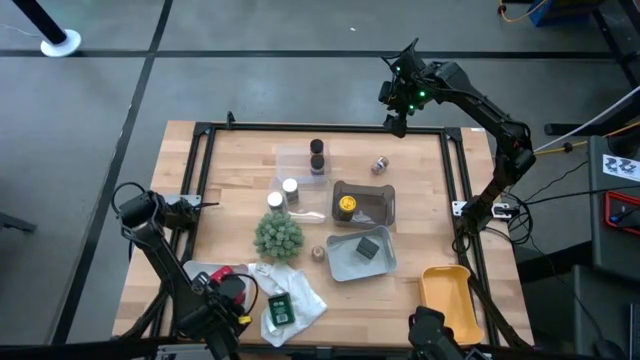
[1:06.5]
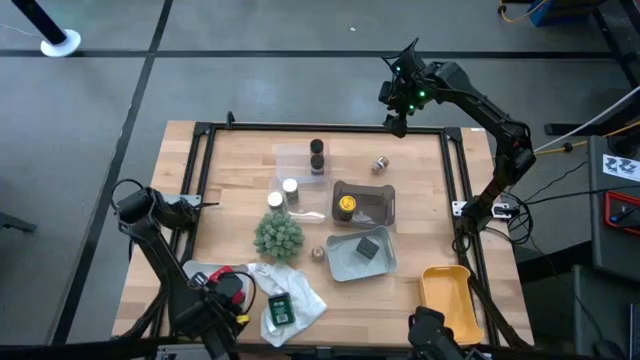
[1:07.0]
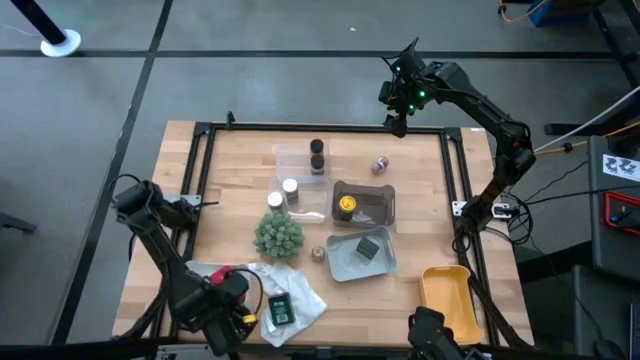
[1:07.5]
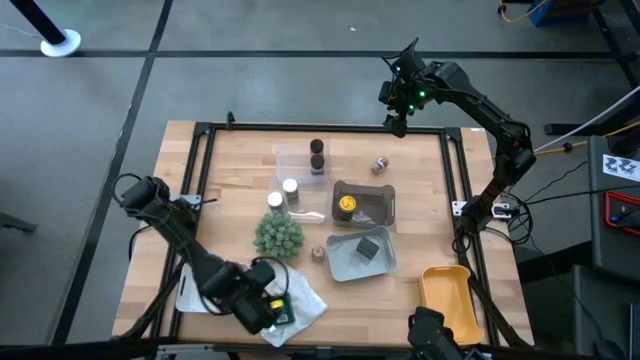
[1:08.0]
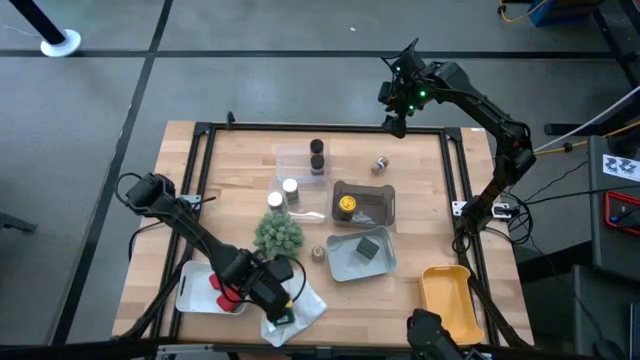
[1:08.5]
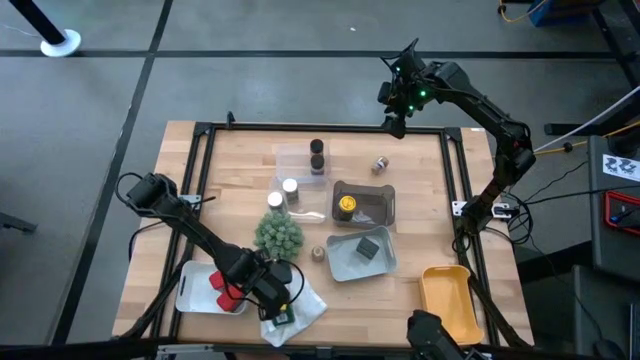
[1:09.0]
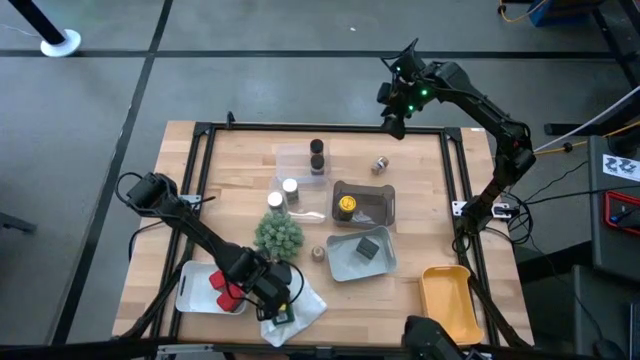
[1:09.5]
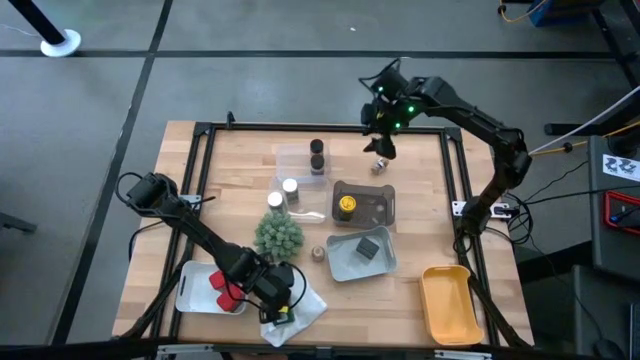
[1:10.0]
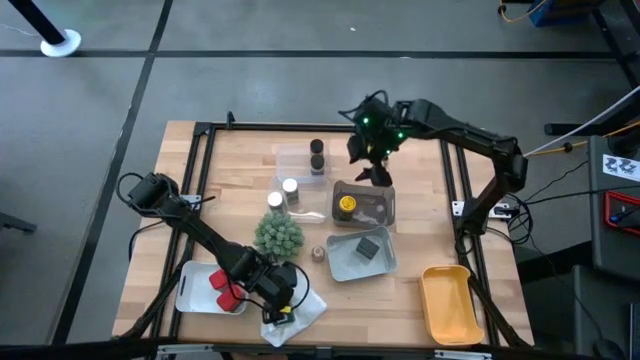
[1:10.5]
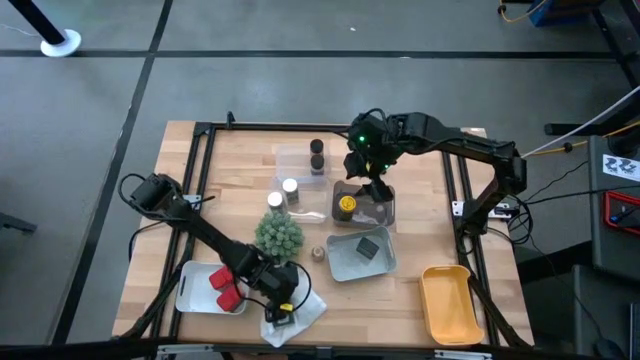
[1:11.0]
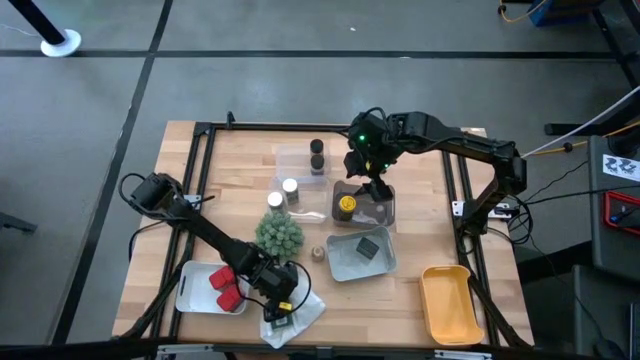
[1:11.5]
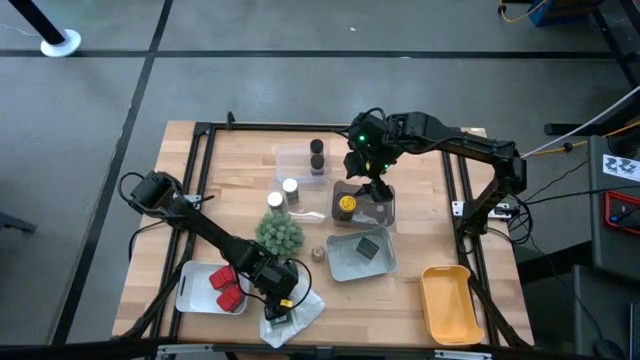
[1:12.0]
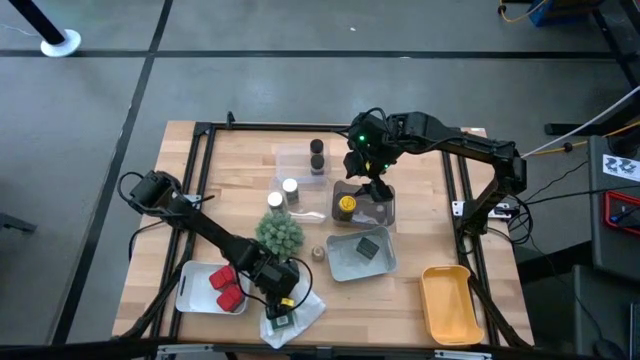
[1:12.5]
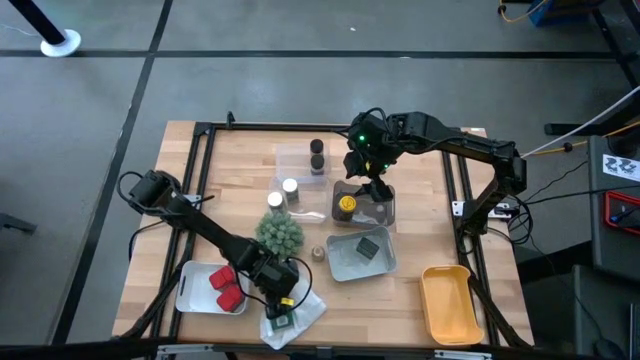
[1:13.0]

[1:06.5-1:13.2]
Task: Sort spices by type
Put the green seasoning can into the gray bin

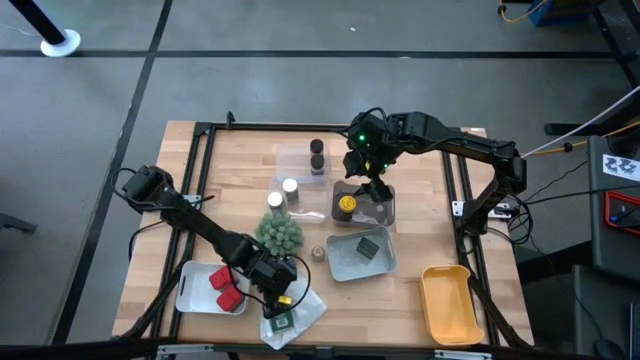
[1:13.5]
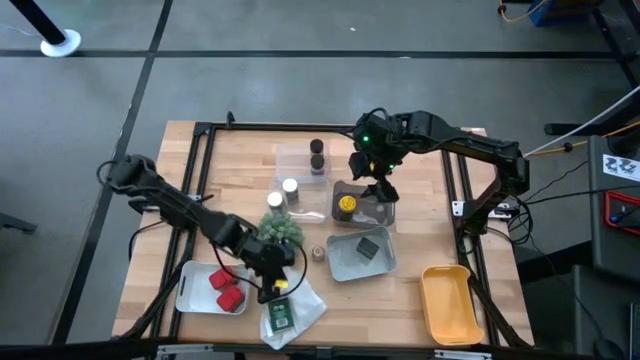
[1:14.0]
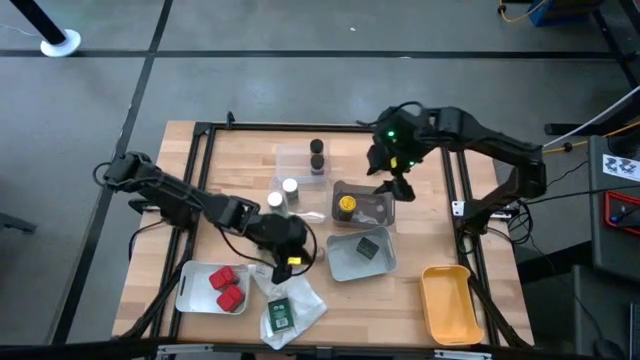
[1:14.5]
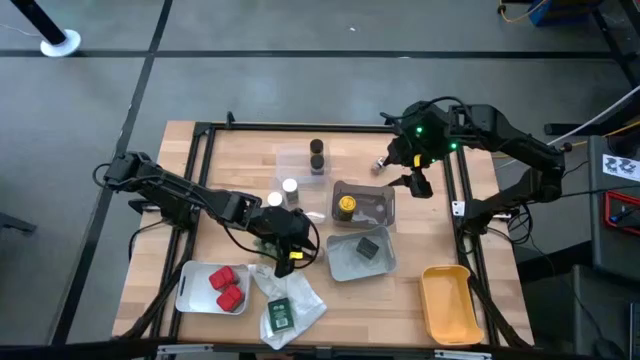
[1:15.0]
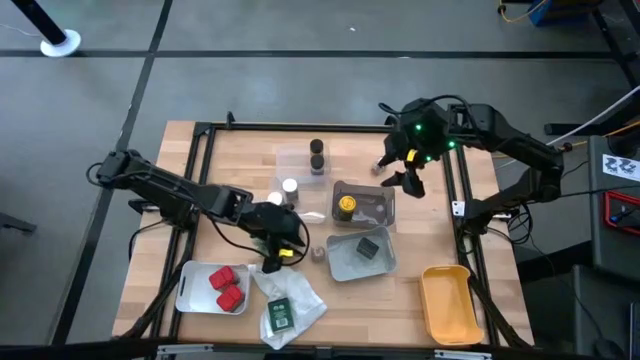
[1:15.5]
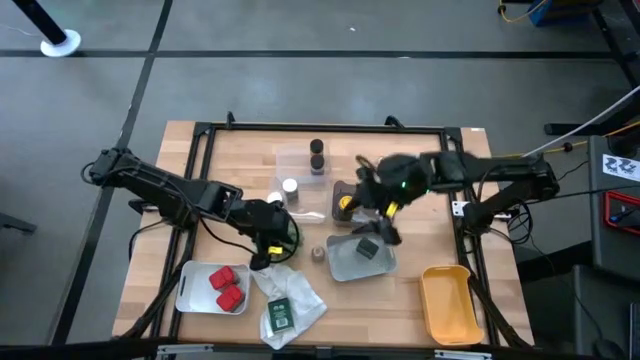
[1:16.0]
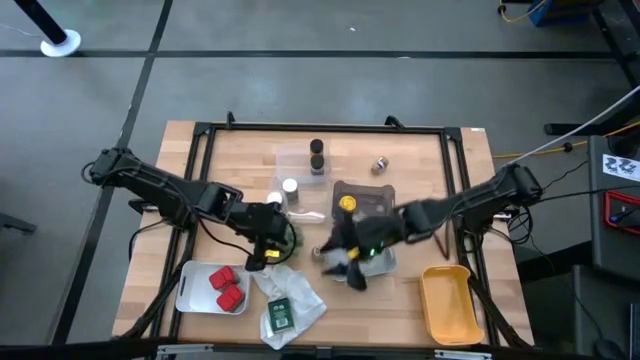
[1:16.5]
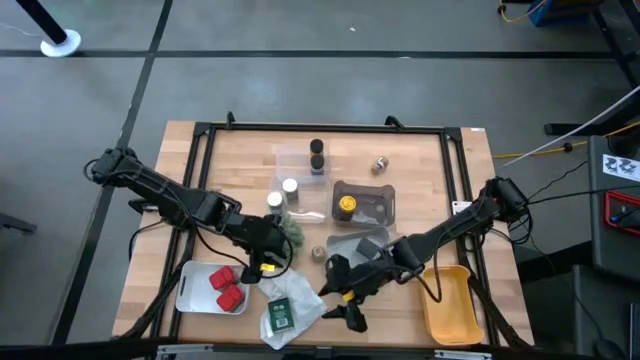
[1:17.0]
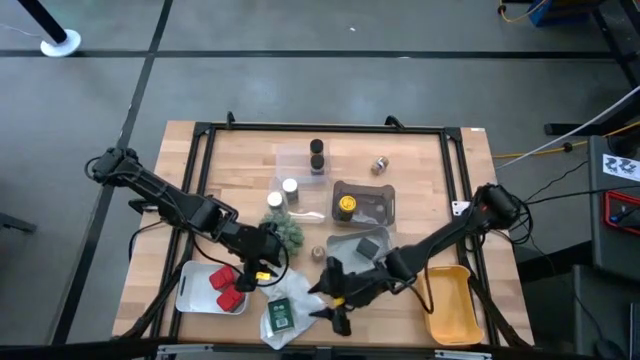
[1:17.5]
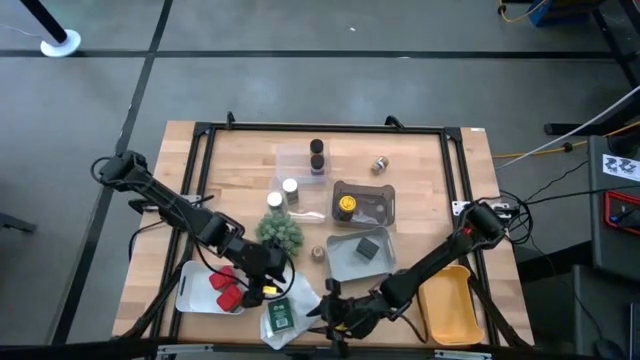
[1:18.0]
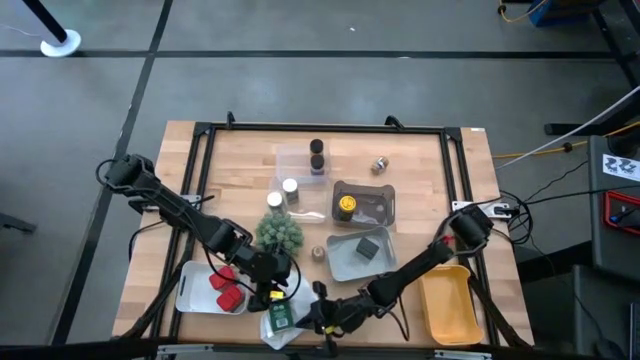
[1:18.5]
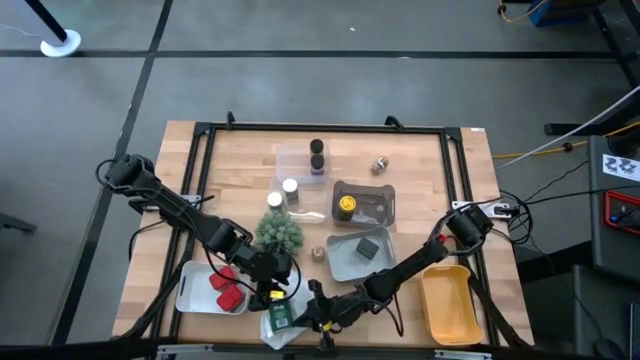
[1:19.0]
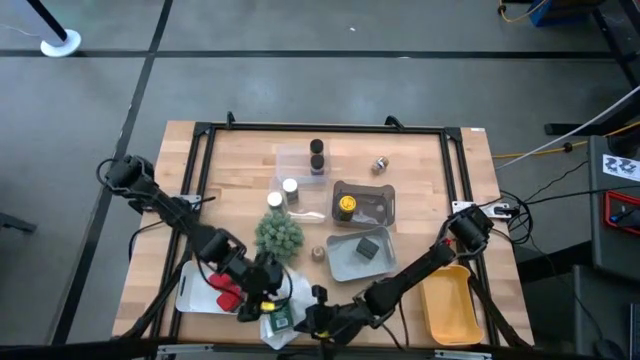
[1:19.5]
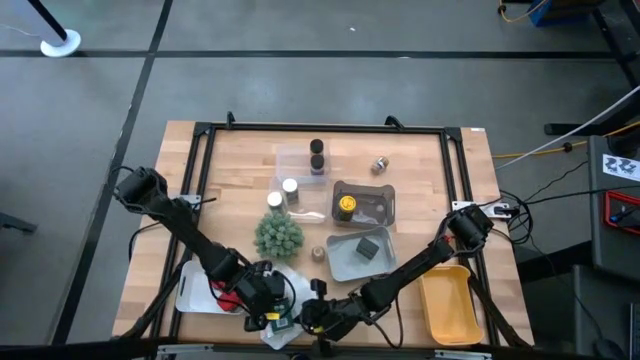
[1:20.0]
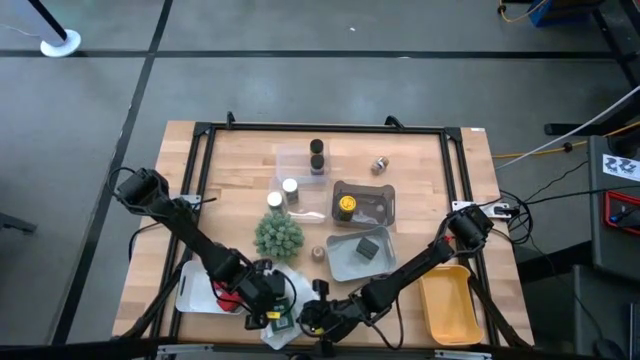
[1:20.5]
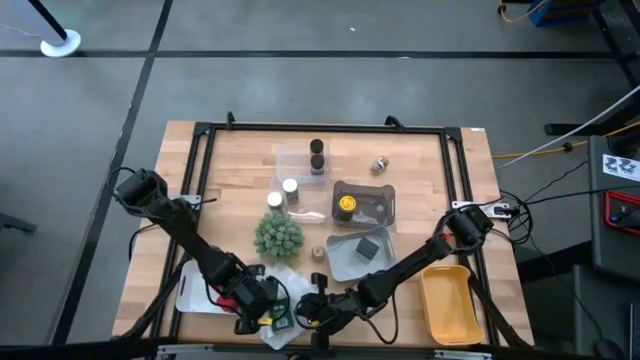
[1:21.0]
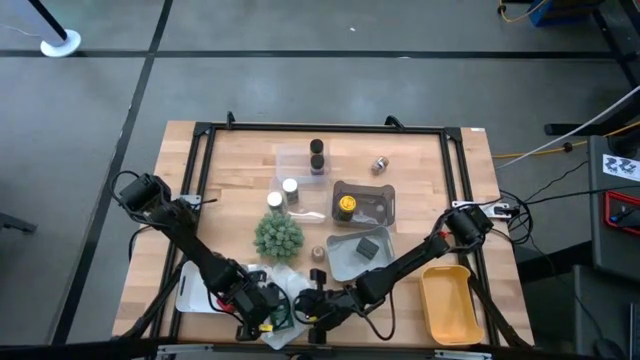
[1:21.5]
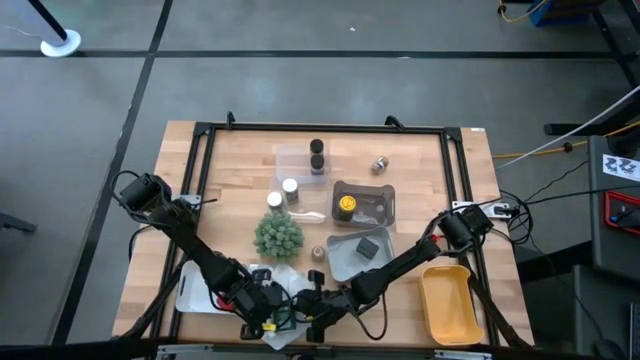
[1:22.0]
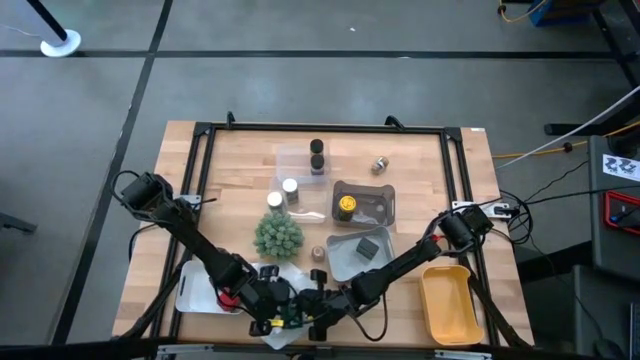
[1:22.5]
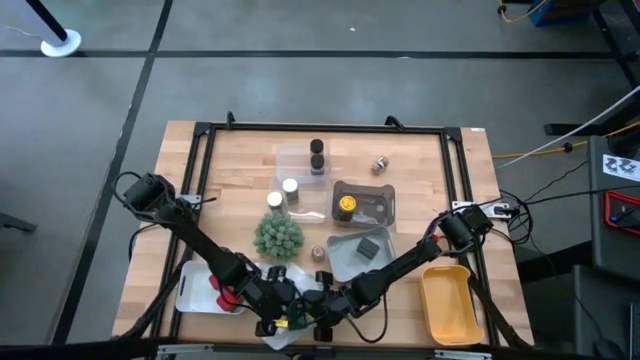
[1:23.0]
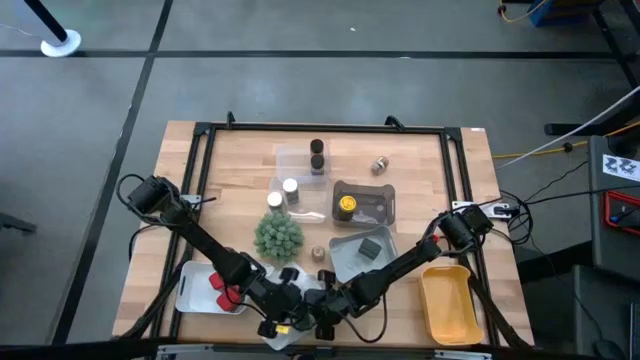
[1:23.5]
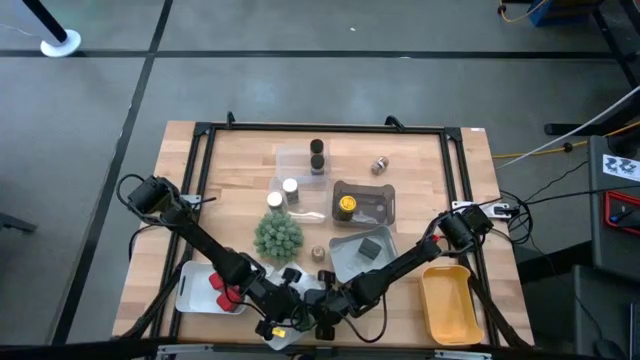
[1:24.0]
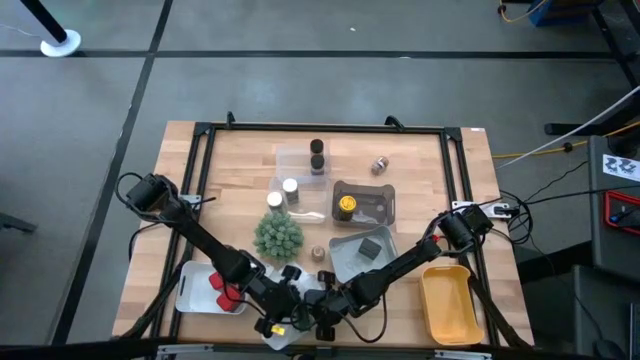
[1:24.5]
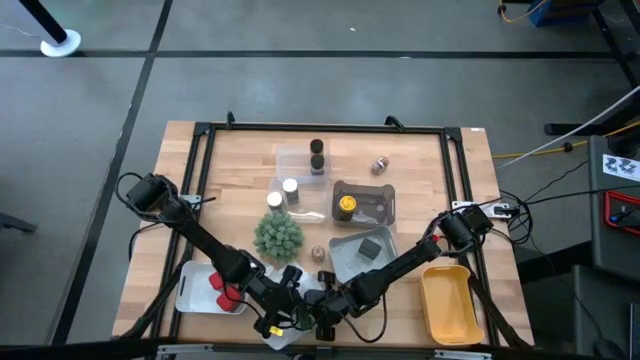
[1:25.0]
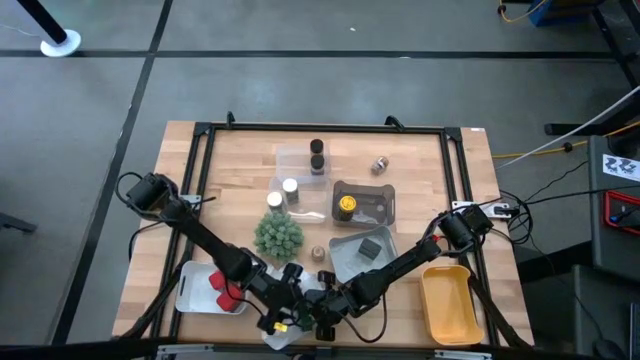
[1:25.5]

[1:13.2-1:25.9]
Put the green seasoning can into the gray bin

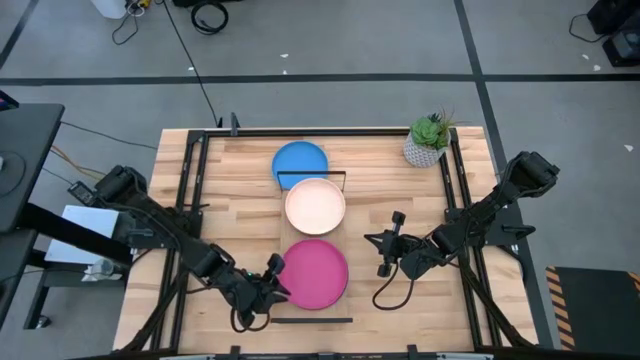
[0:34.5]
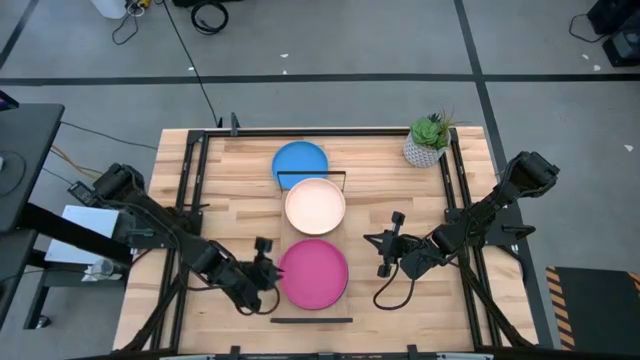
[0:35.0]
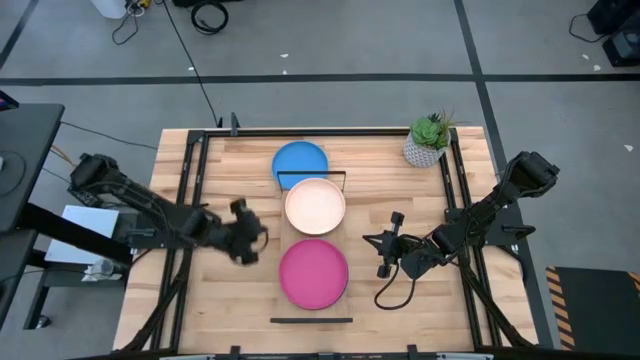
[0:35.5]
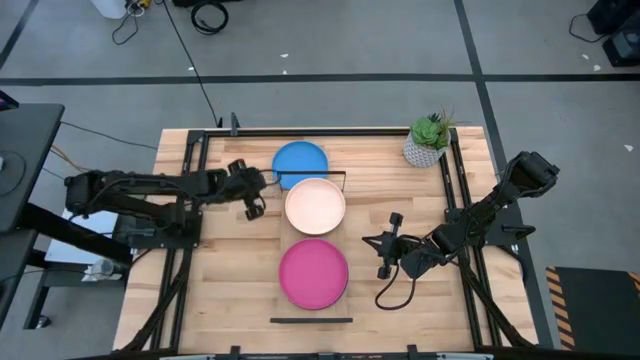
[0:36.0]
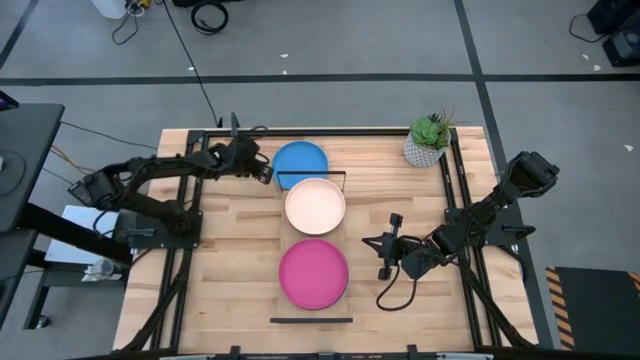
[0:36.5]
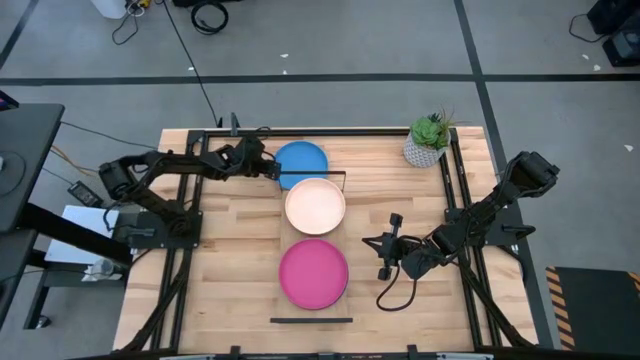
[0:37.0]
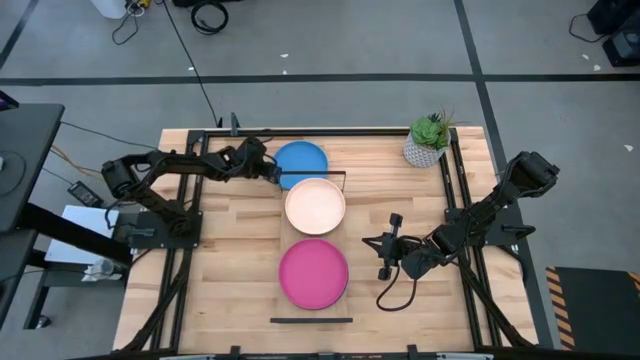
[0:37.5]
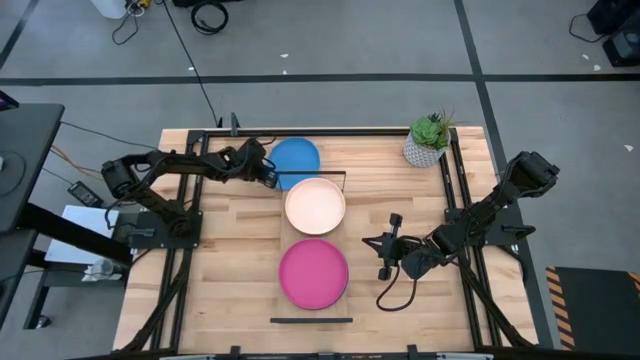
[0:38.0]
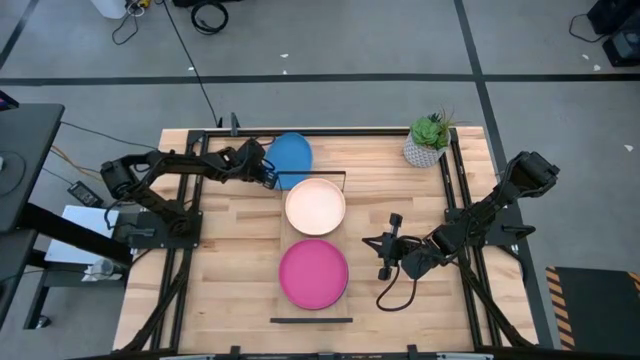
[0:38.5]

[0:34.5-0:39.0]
Task: Place and stack plates onto a shelf
Stack the blue plate on top of the pink plate on the shelf
